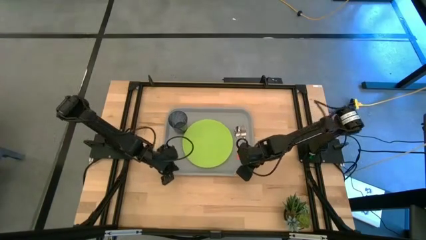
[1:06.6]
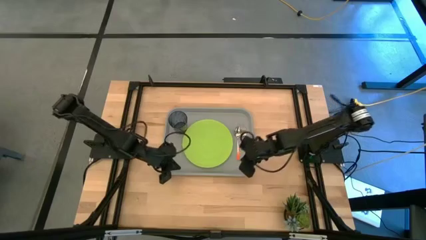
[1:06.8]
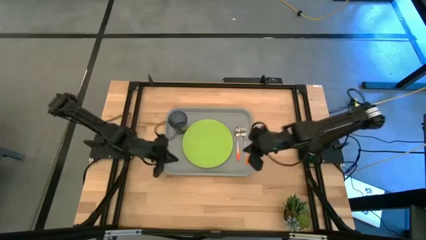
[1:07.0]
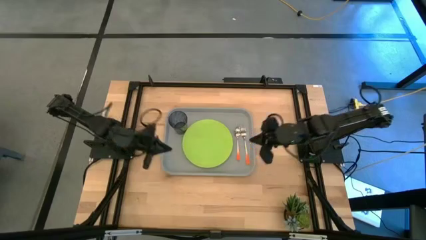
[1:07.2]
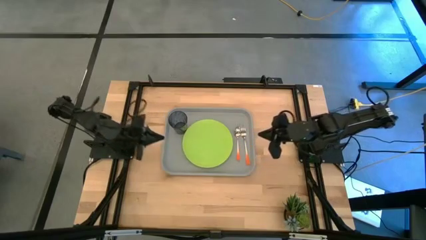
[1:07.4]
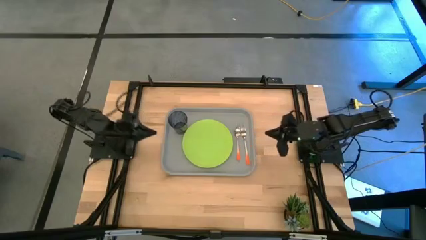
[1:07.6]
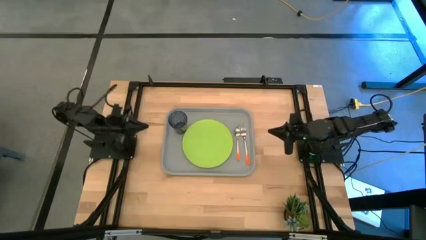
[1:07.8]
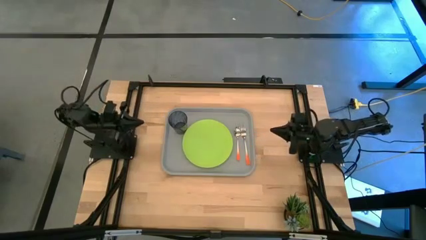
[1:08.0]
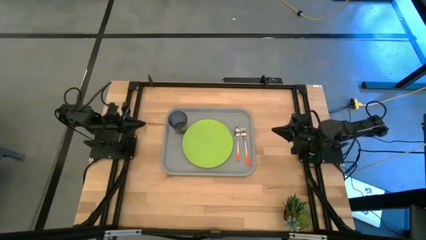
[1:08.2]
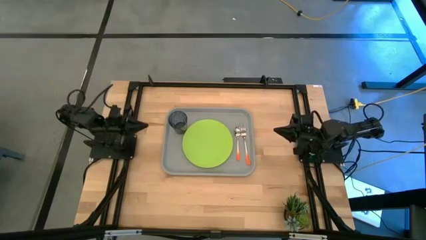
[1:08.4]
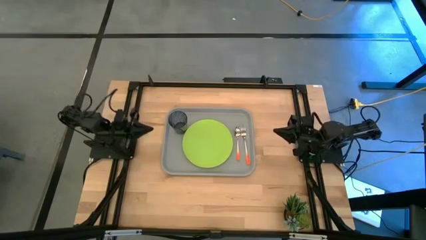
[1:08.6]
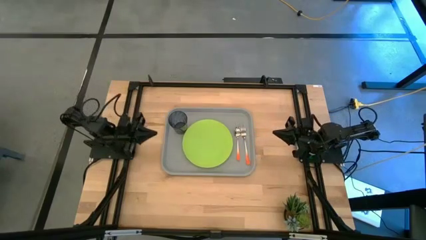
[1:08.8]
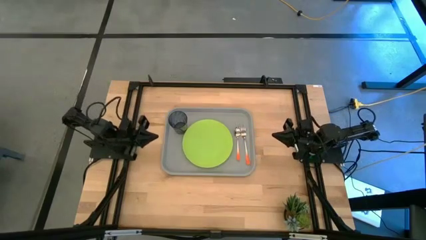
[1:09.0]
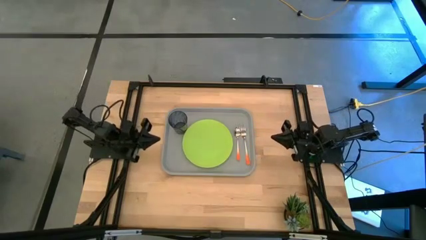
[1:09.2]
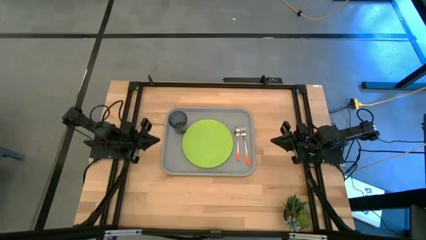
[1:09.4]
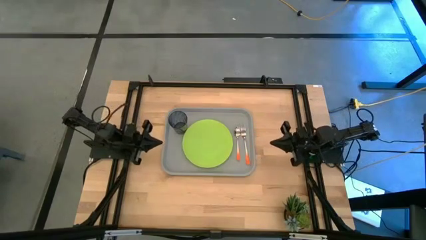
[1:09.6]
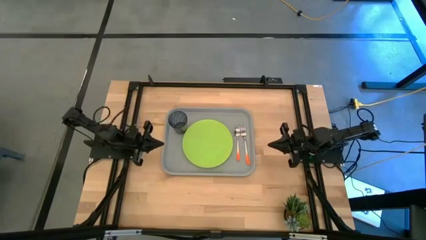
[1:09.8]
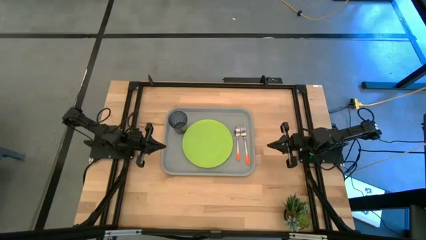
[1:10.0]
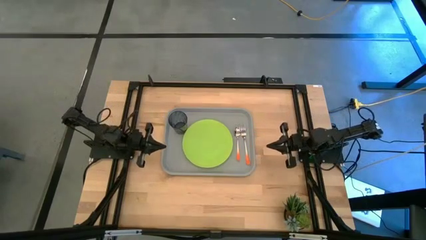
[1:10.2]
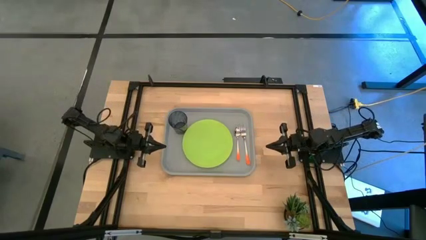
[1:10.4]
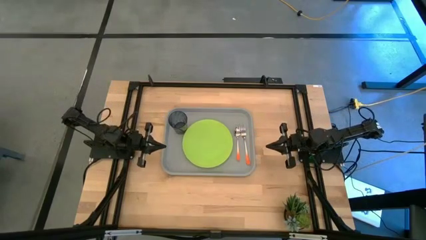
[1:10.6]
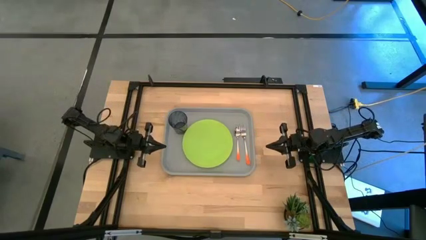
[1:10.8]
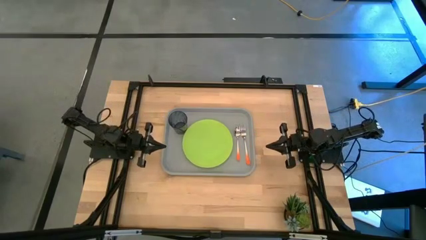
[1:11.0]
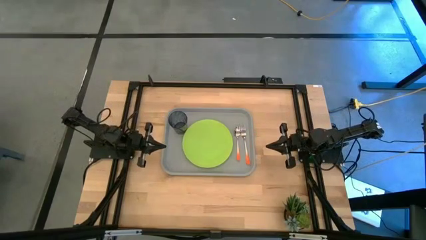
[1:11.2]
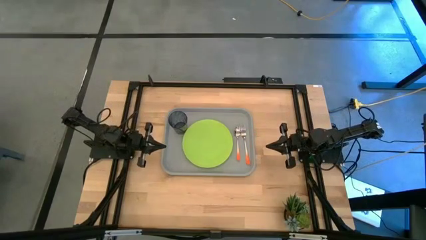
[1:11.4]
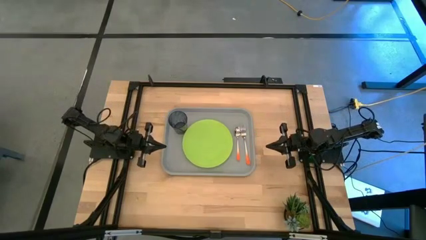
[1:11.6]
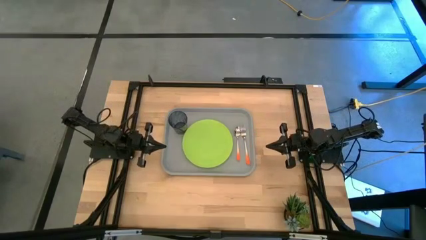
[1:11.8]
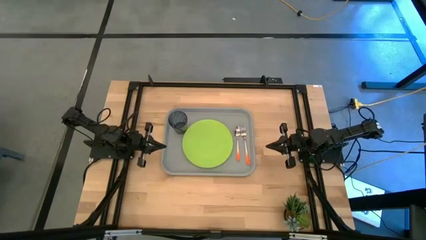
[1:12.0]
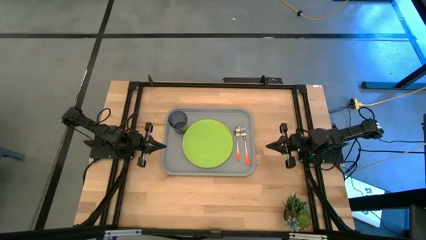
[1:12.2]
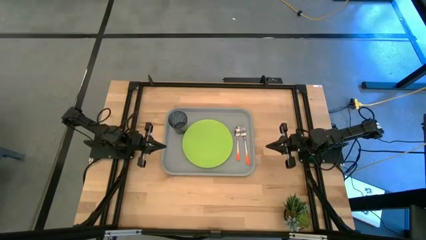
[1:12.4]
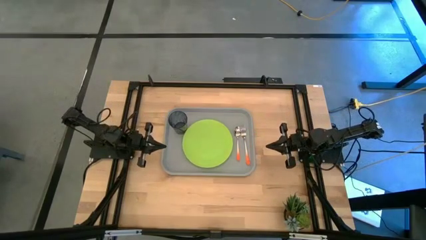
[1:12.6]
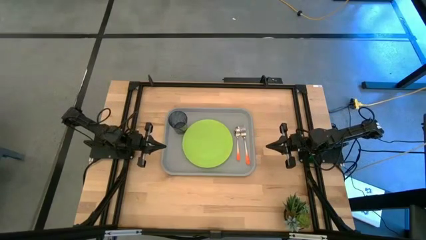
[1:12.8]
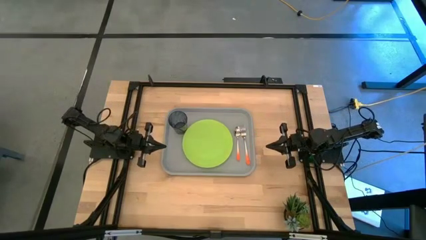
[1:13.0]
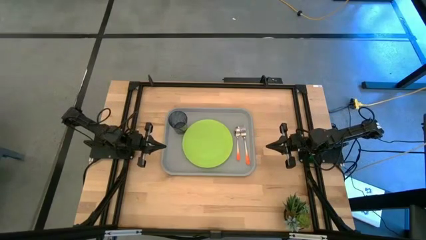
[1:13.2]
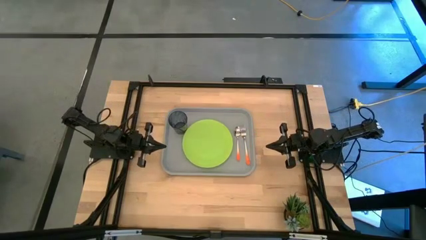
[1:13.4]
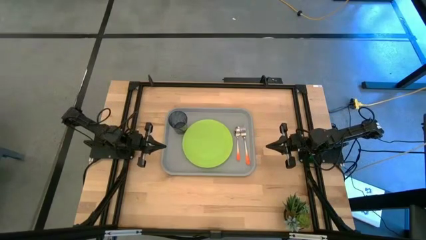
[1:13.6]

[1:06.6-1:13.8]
Task: Pick and place plate/cup/fork/spoon on tray
Return to Home Position

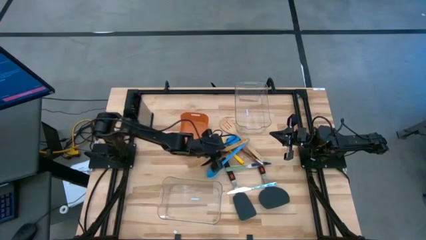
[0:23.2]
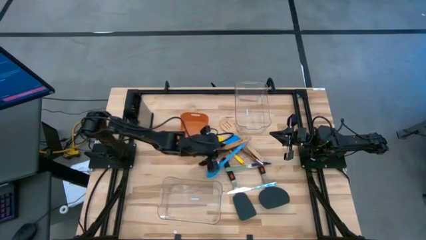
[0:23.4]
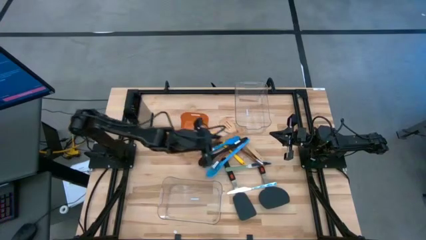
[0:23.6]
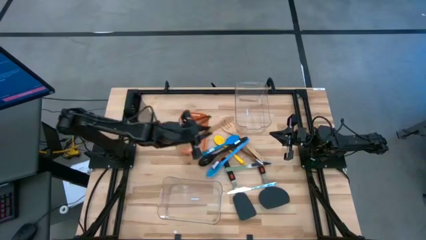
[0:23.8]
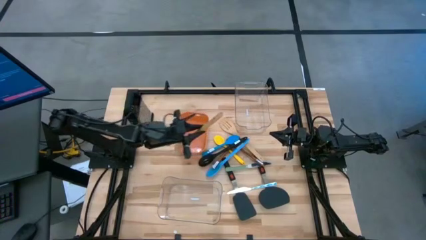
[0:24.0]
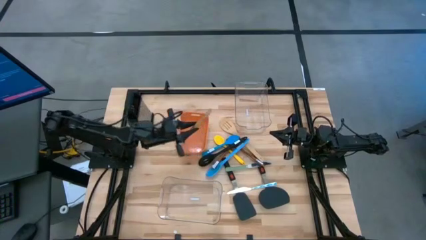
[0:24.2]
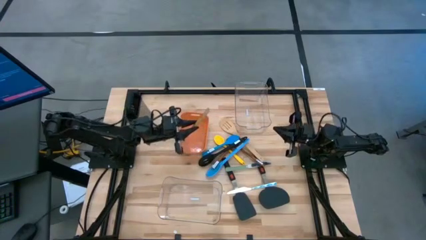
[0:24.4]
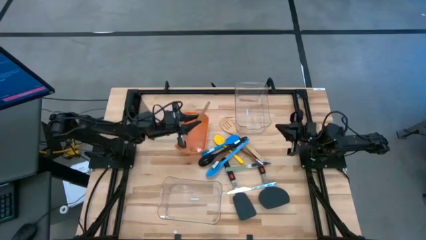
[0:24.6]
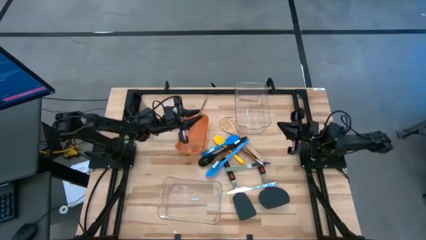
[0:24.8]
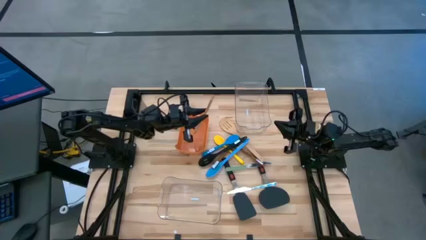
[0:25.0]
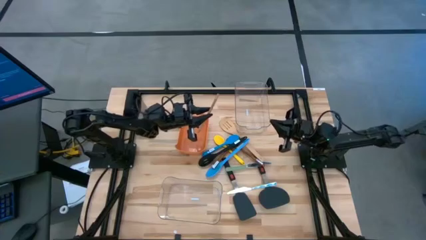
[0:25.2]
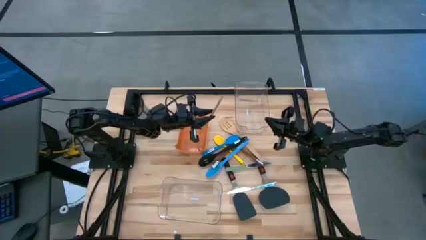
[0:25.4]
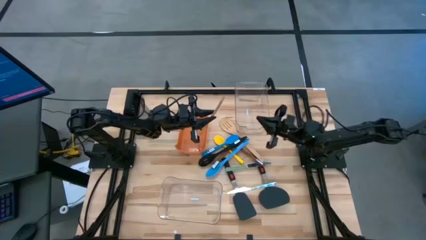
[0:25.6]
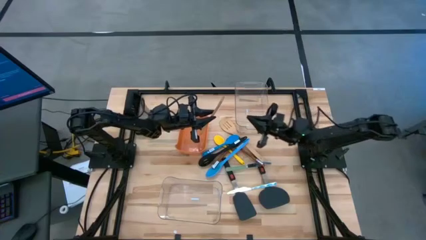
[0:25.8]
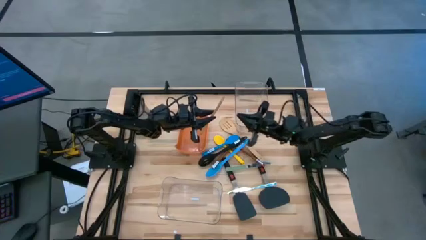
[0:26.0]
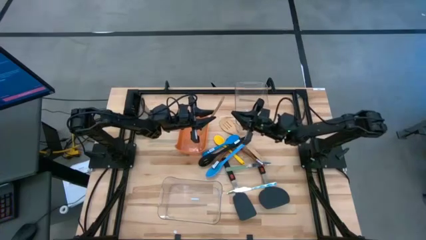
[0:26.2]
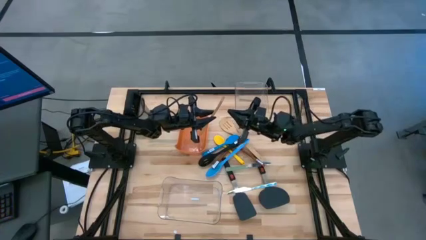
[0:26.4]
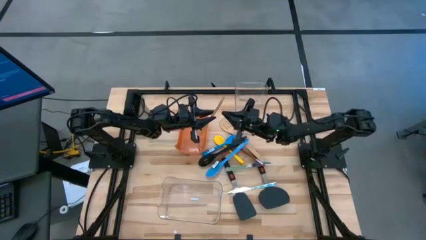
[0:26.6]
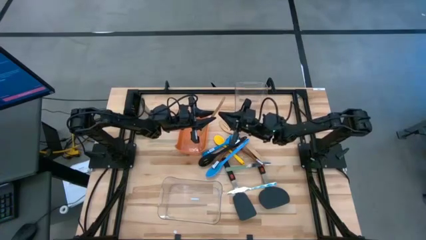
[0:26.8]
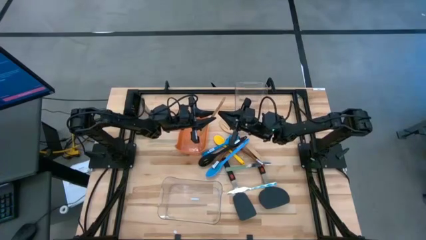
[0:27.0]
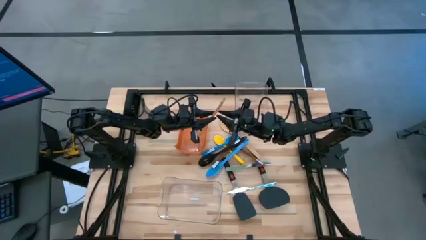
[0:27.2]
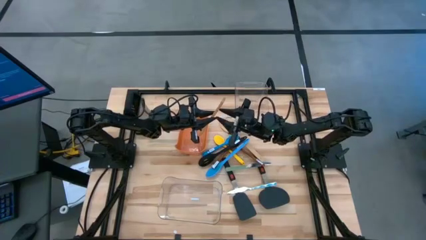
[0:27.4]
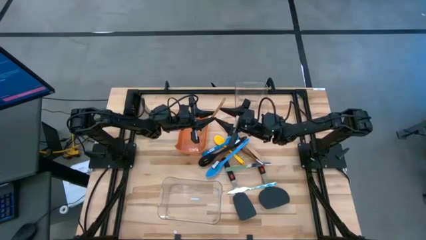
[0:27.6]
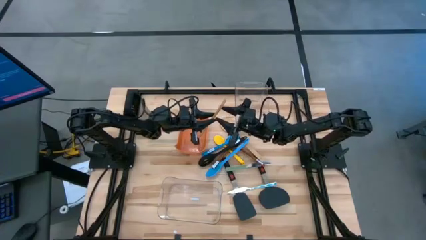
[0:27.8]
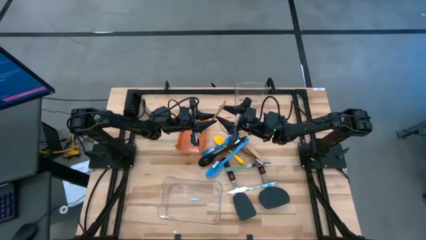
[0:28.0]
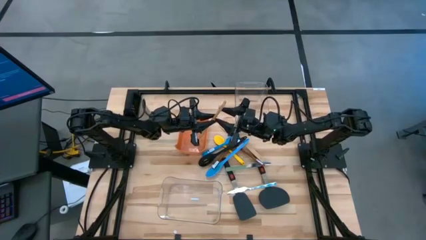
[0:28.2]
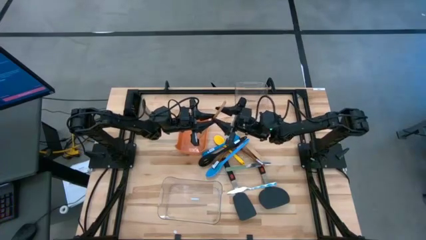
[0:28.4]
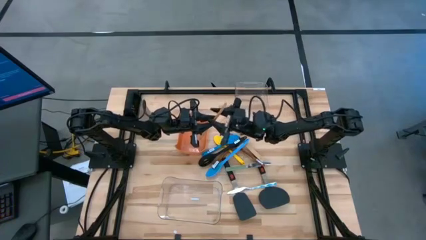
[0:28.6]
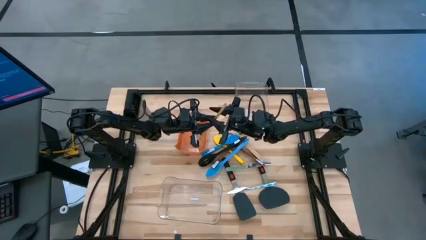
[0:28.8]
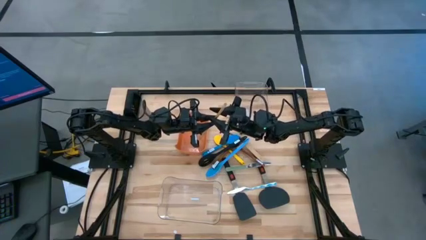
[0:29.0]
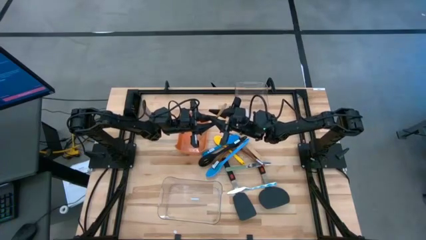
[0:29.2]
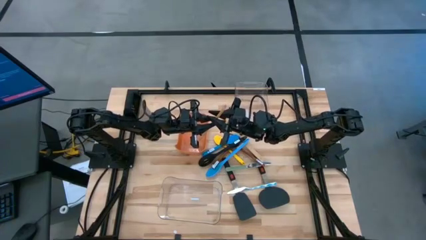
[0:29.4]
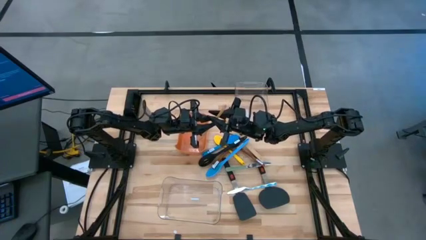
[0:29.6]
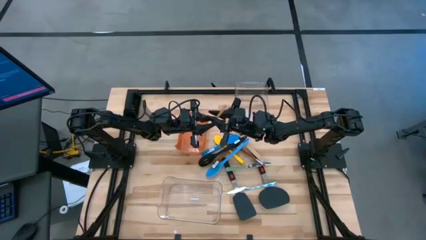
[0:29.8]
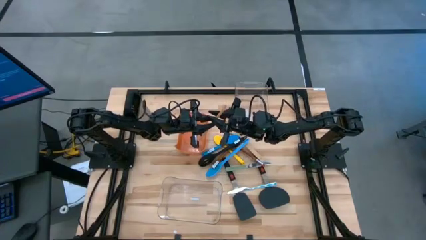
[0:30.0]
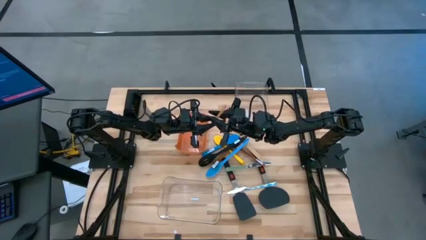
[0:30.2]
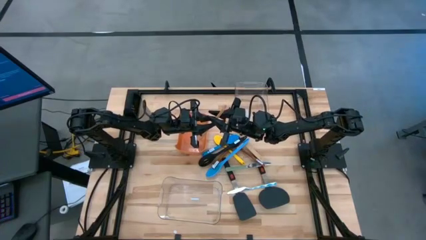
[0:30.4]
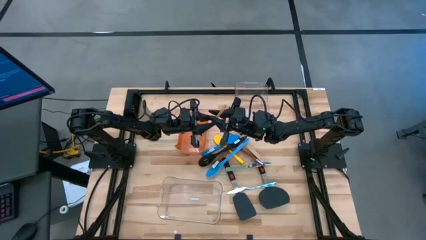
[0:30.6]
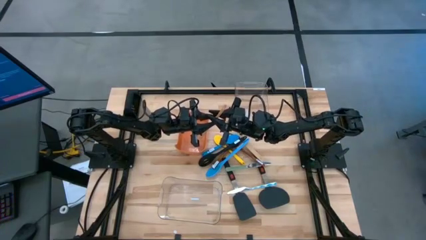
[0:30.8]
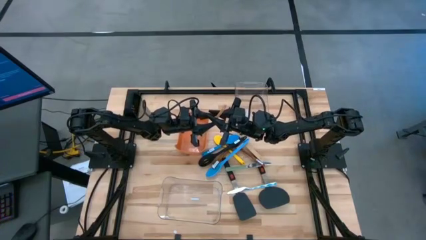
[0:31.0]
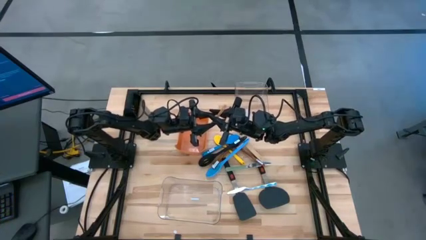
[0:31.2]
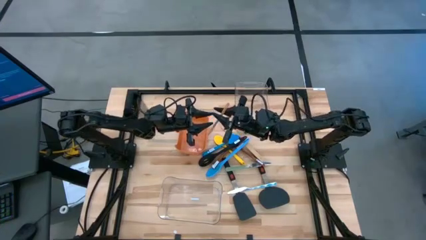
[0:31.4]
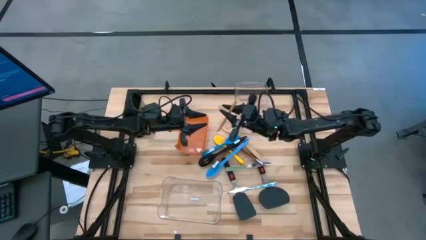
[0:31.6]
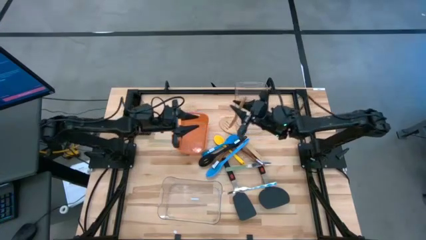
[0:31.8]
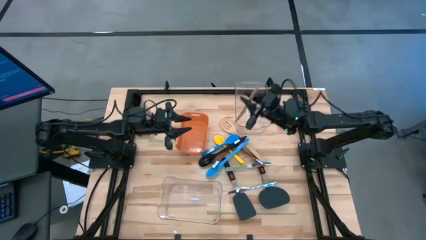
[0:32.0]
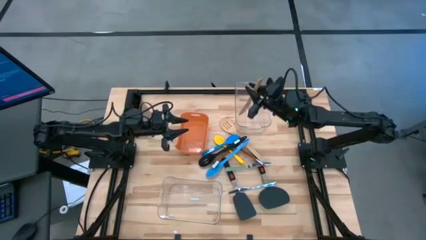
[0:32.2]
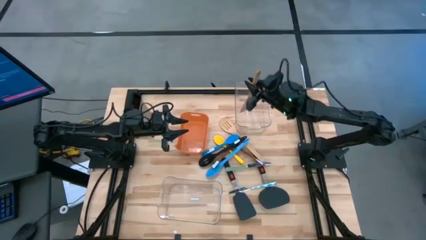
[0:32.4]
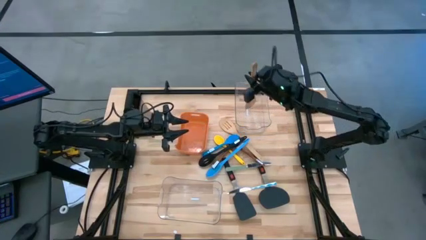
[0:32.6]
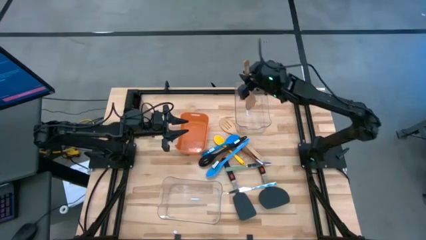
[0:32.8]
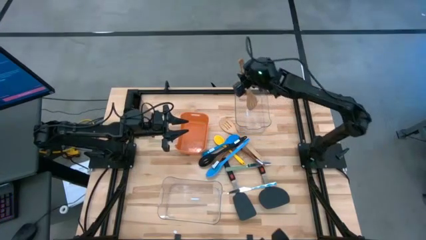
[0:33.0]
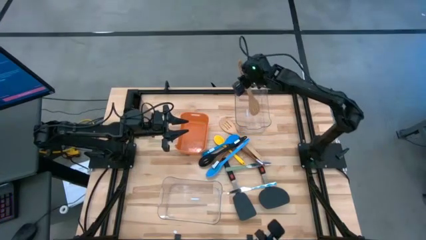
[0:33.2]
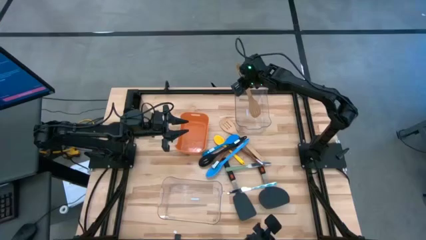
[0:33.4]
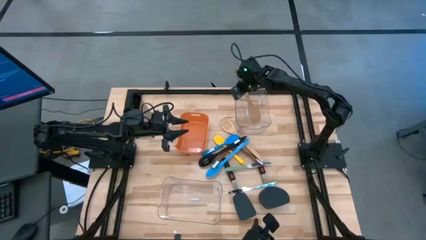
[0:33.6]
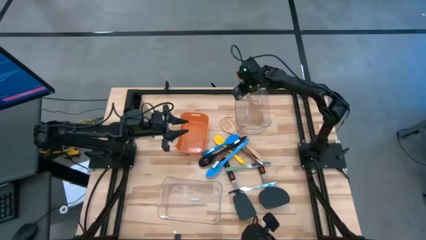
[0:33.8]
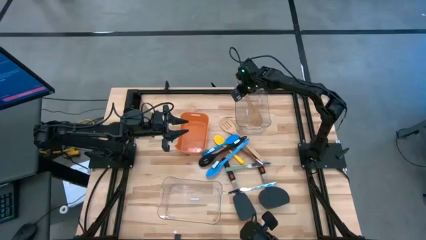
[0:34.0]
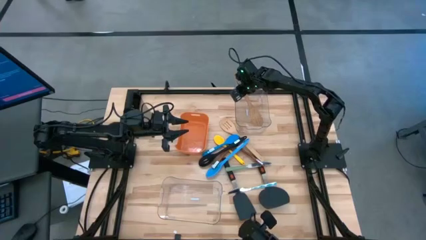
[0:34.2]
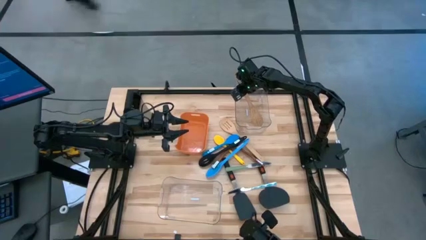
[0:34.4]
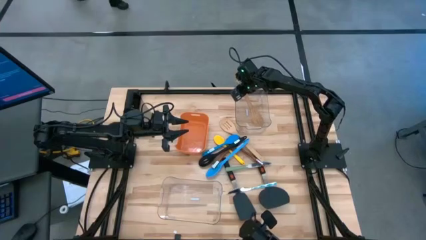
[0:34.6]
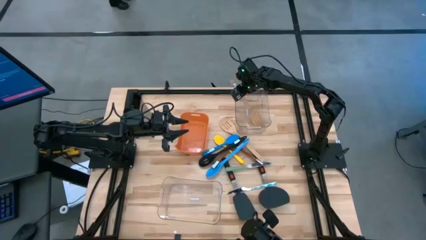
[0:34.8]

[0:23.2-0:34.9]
Task: Pick & Place Kitchen Items
Put the brown spatula into the top transparent bin
